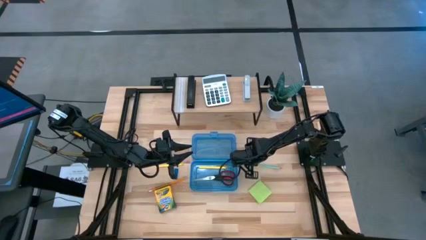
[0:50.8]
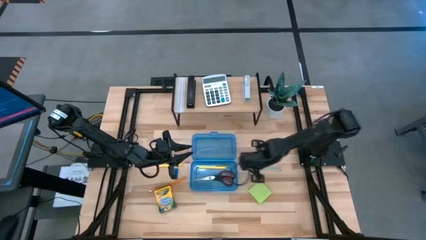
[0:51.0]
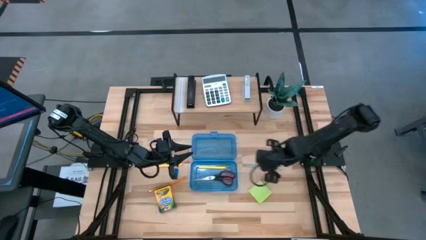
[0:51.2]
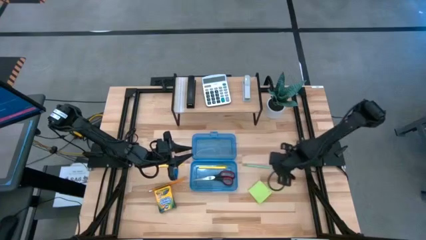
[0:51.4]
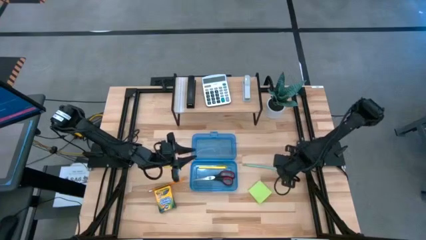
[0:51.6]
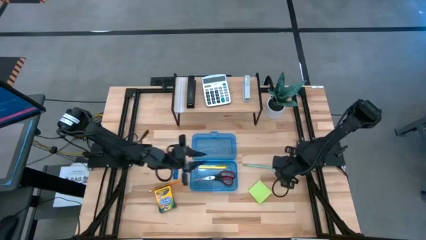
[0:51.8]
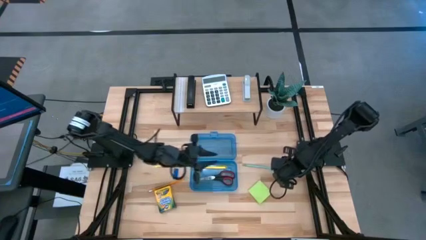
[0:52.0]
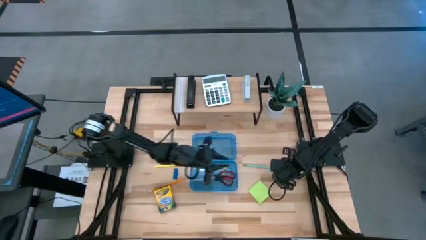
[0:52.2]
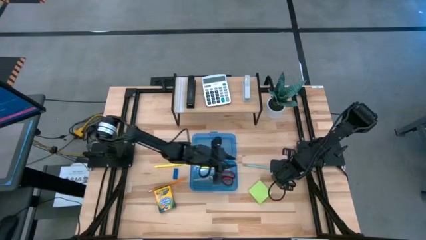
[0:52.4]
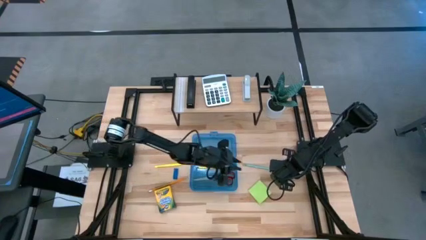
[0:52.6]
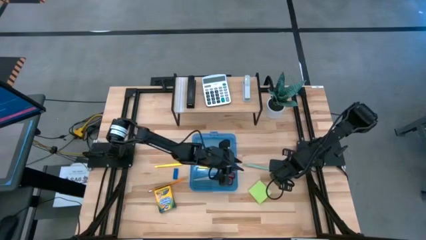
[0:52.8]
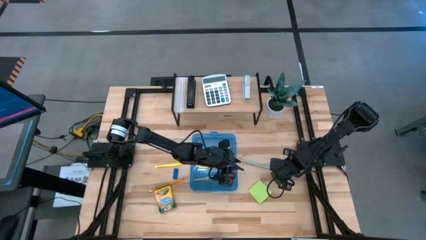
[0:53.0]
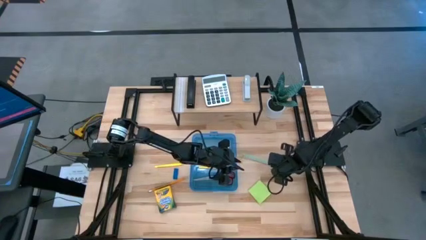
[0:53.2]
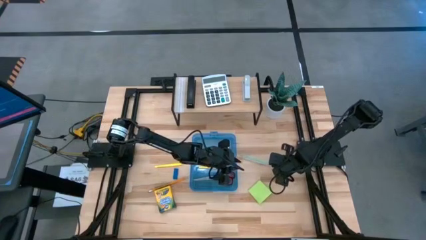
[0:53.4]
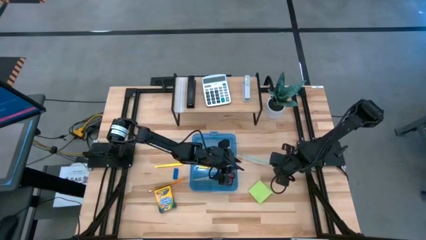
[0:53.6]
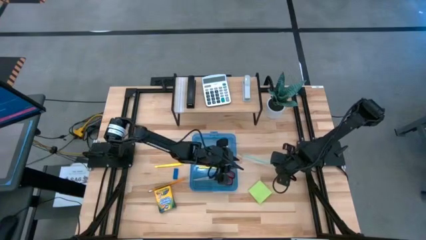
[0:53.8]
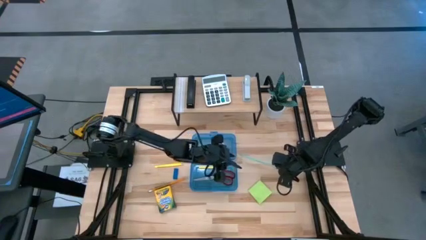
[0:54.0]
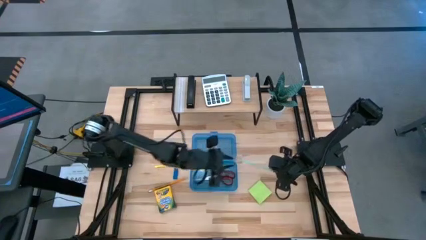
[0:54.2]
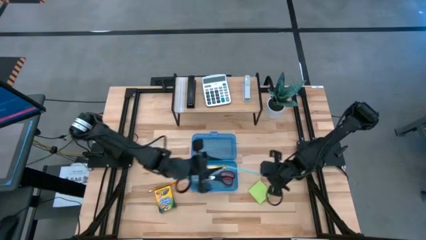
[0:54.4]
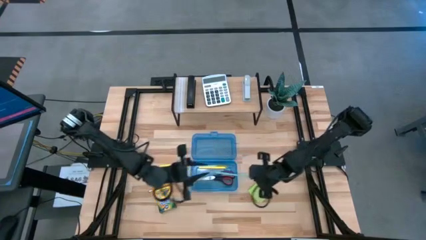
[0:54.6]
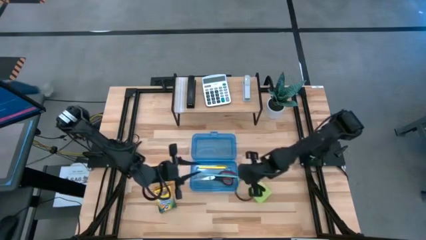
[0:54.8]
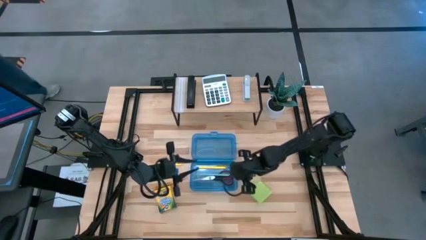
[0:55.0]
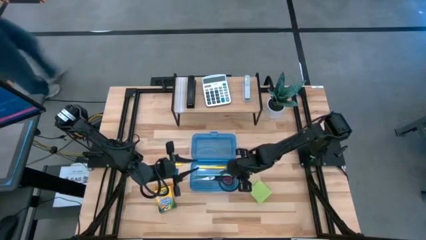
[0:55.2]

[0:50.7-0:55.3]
Task: Pack school essentials
Put the blue pencil into the blue supply box

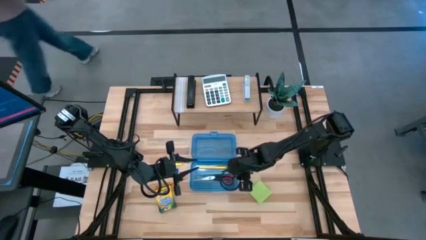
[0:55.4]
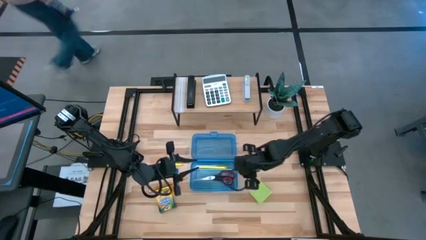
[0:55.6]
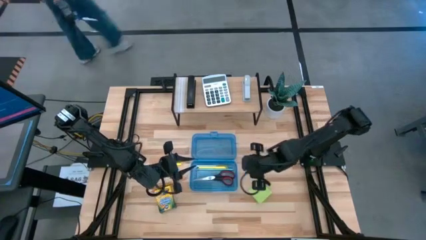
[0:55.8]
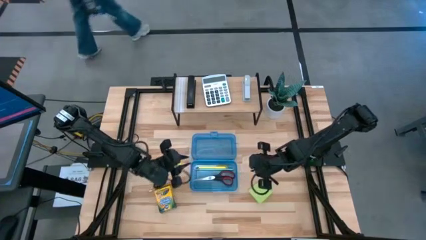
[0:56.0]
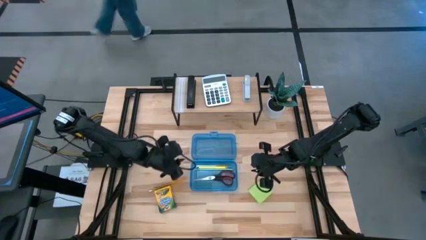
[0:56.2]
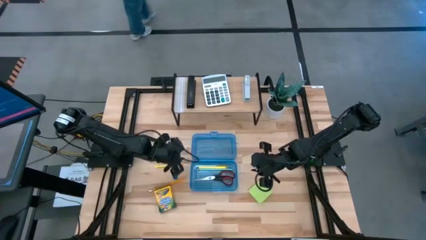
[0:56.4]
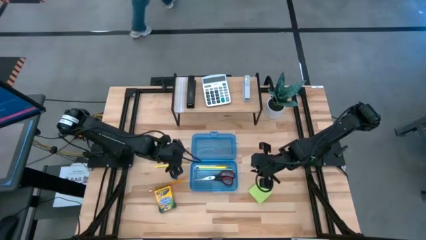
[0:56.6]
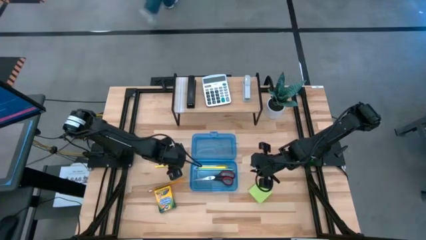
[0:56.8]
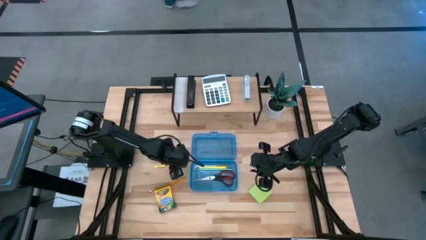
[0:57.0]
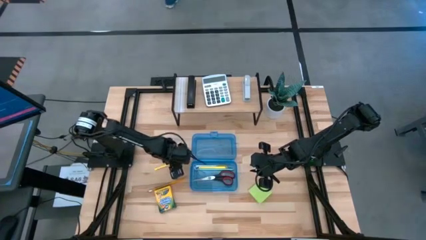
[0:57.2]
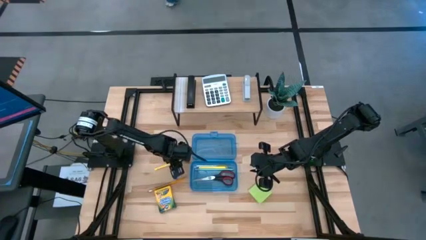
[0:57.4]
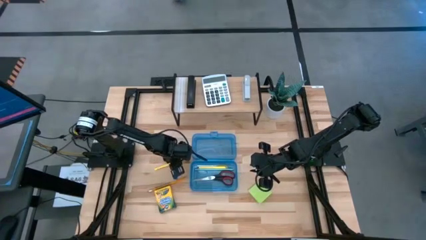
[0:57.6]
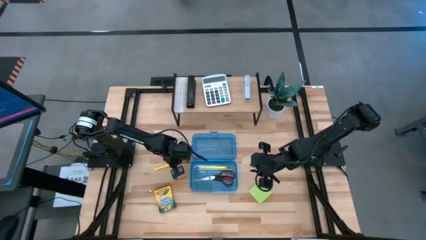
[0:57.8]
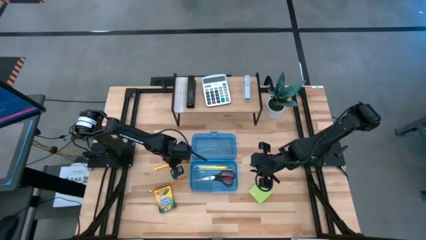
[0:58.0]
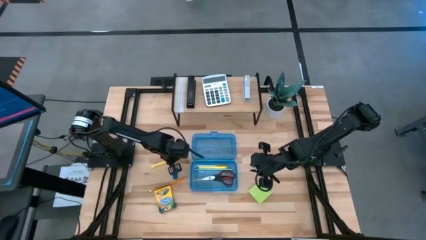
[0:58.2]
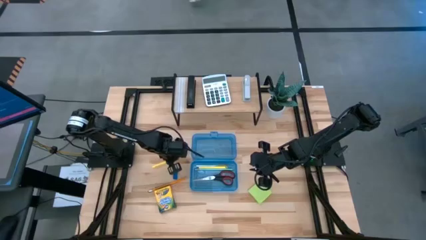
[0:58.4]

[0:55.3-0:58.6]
Put the yellow pen into the blue supply box

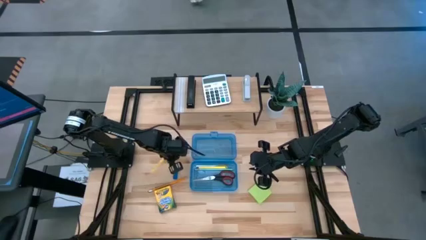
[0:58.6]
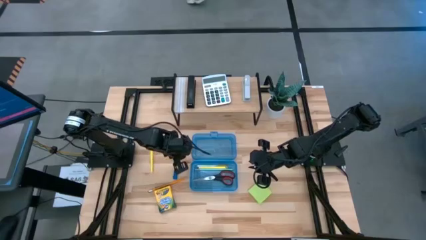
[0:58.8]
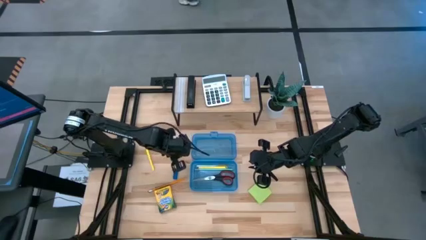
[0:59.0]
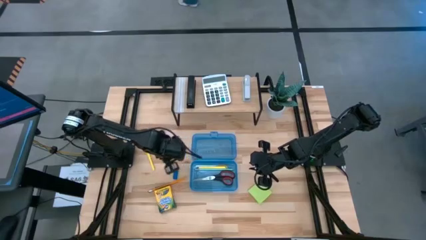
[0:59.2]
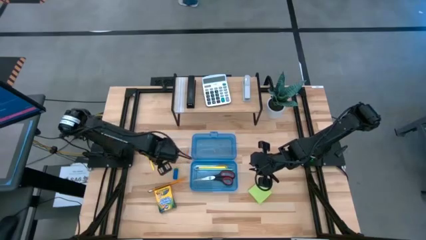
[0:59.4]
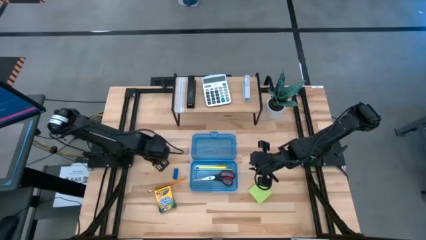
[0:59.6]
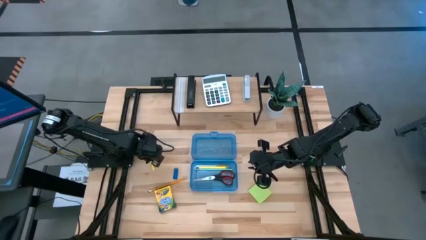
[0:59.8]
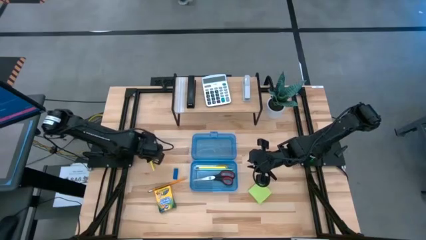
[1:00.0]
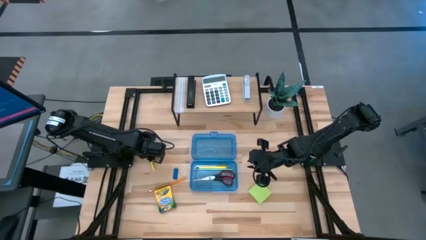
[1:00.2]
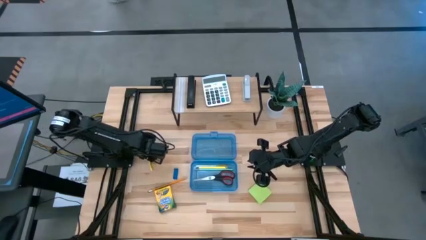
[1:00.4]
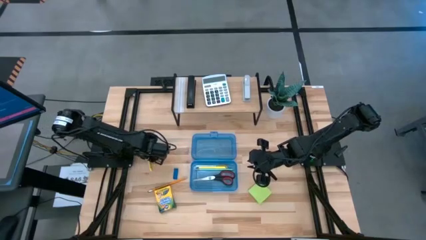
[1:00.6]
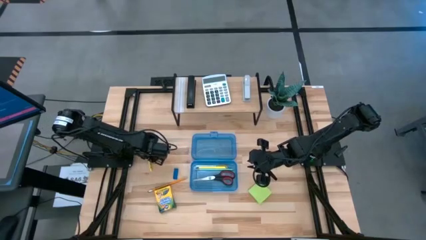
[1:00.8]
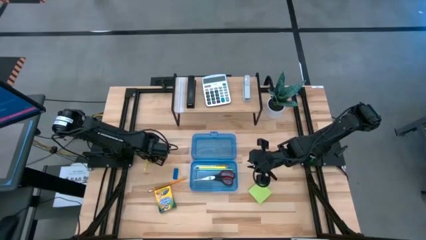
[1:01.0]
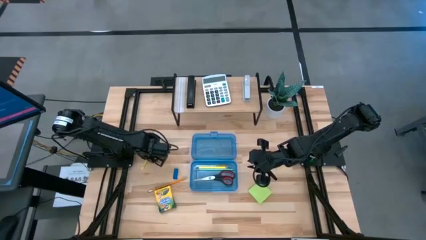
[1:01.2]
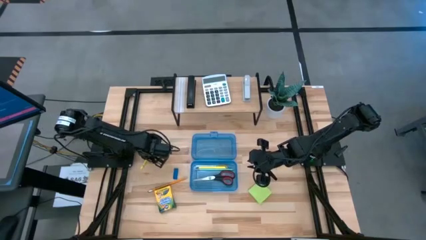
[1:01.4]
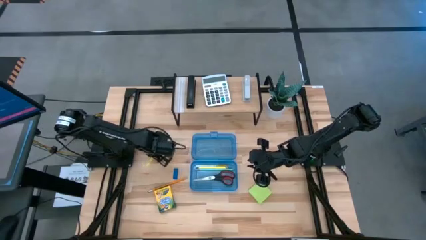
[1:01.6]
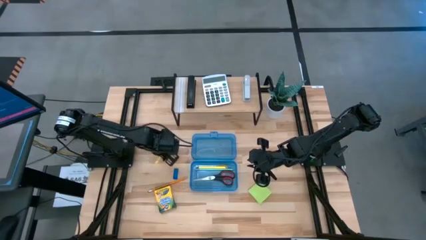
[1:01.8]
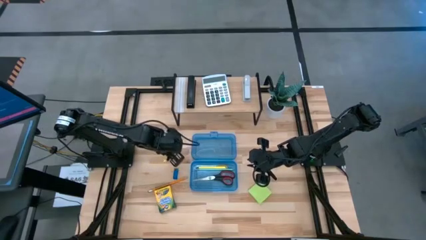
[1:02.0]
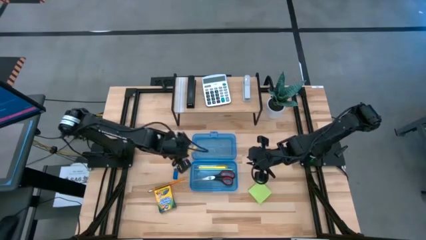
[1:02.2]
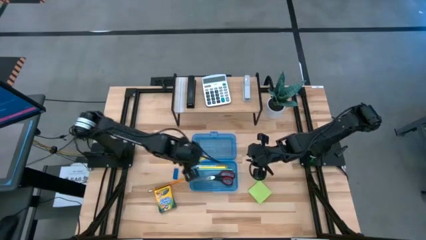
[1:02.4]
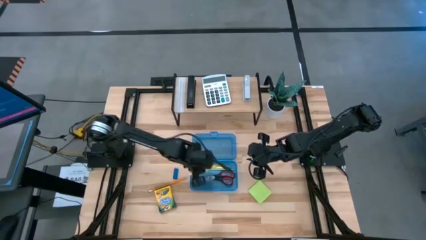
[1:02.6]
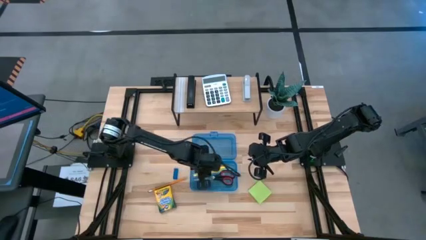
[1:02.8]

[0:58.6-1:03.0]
Put the yellow pen into the blue supply box

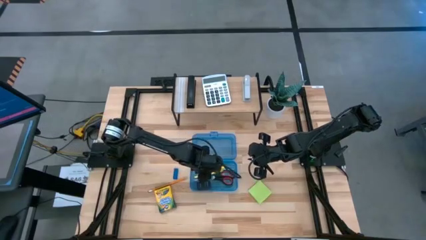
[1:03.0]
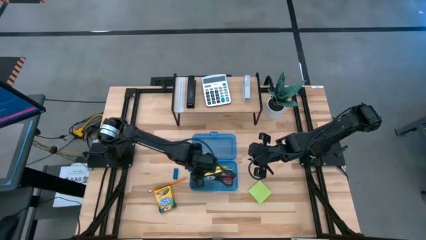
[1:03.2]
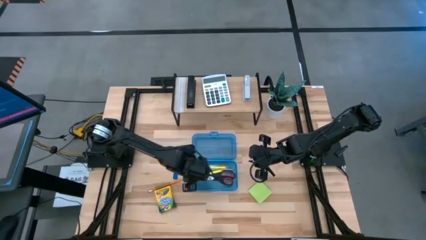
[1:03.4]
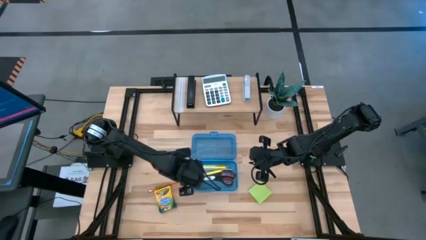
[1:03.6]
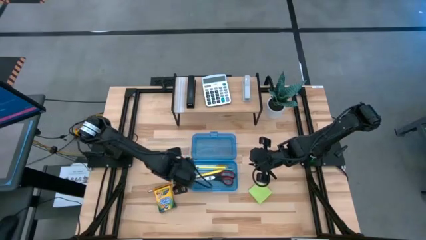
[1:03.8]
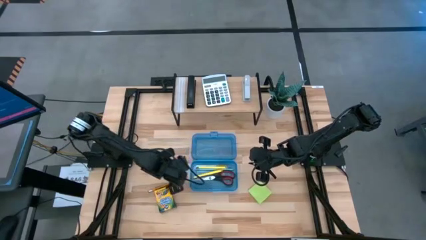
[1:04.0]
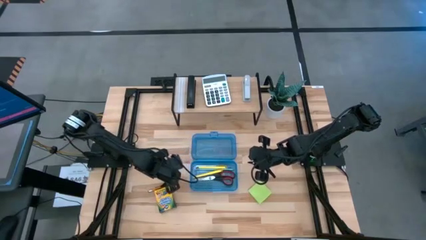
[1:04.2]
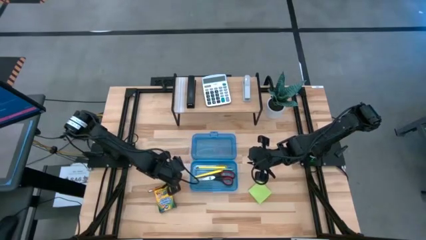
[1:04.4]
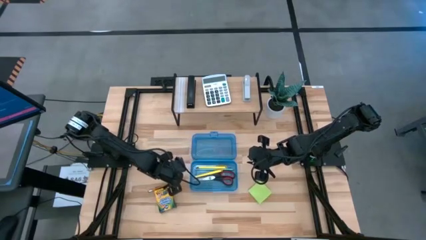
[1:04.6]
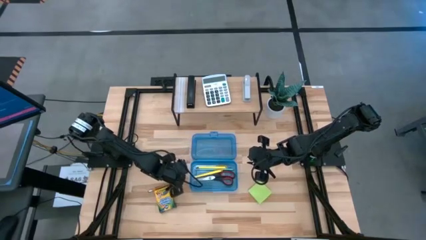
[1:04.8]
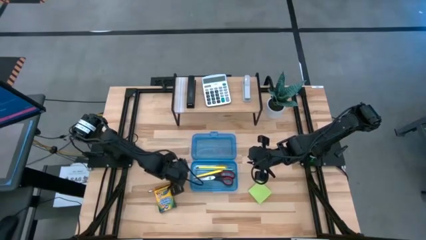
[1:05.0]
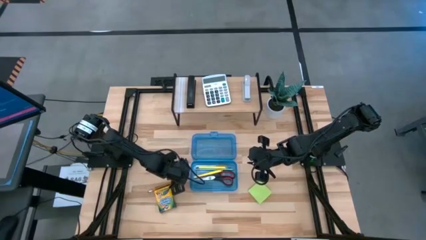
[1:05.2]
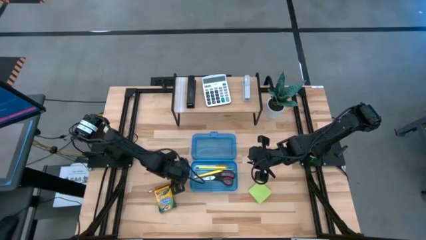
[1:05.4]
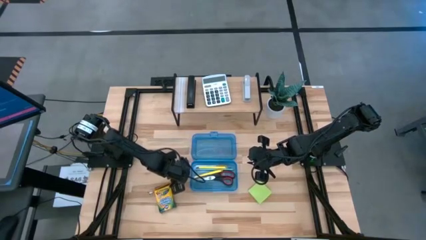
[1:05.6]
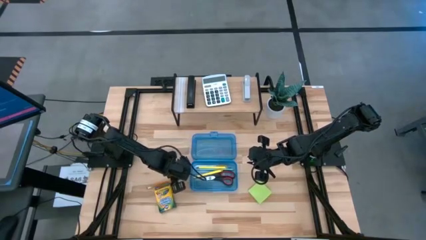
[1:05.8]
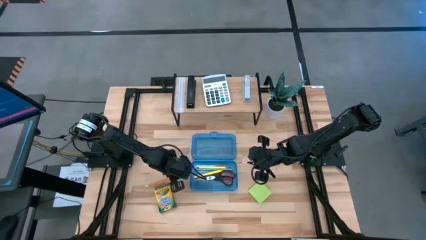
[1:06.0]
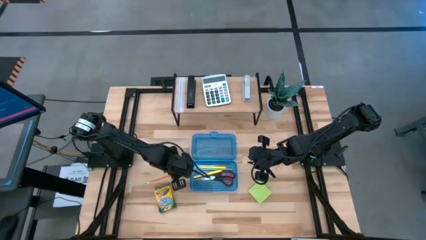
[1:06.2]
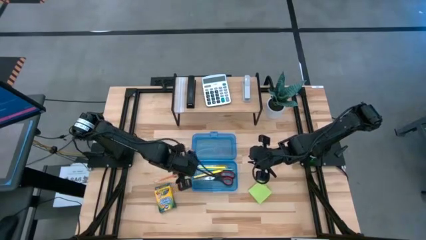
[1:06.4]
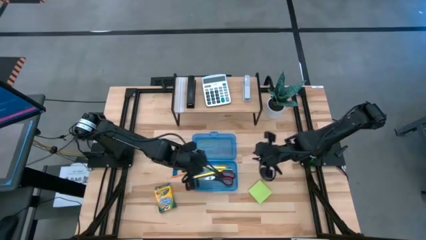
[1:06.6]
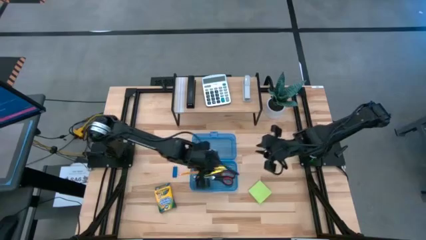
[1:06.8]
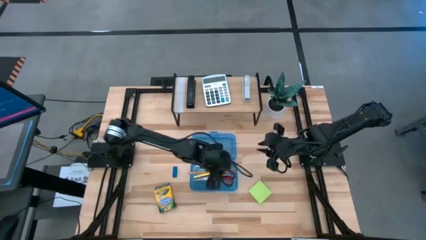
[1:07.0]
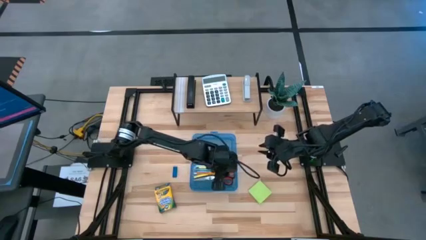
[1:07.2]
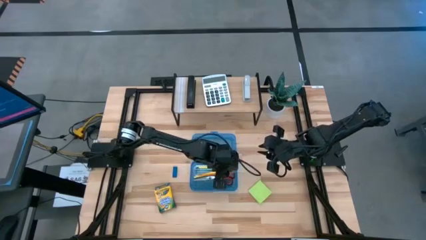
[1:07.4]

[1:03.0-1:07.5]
Put the yellow pencil into the blue supply box
